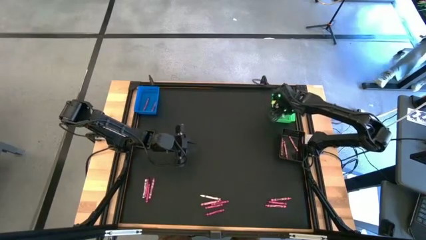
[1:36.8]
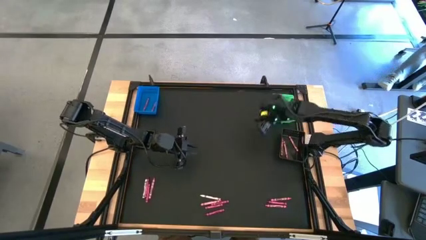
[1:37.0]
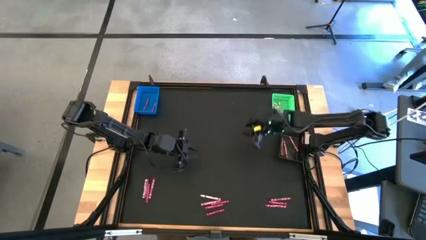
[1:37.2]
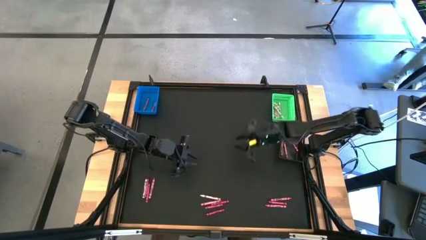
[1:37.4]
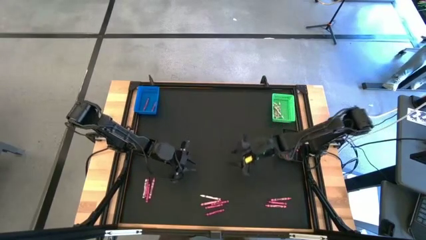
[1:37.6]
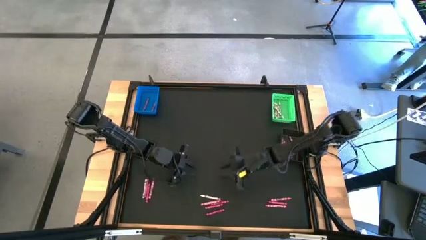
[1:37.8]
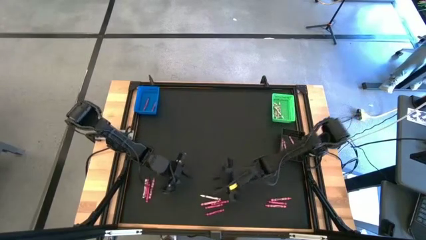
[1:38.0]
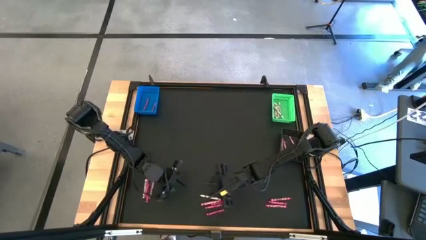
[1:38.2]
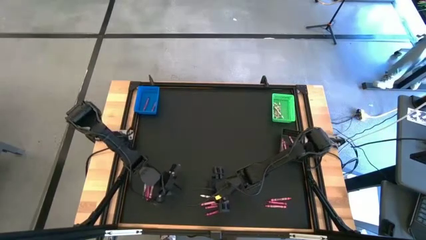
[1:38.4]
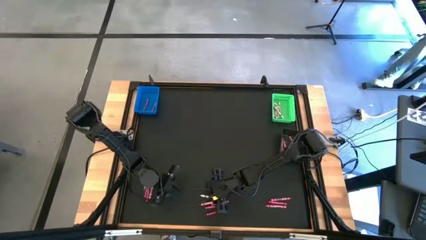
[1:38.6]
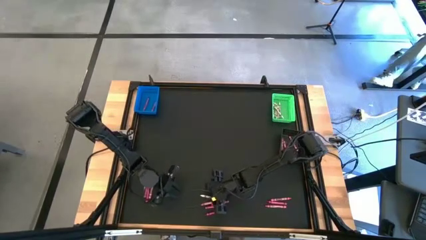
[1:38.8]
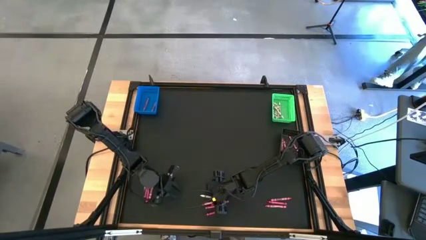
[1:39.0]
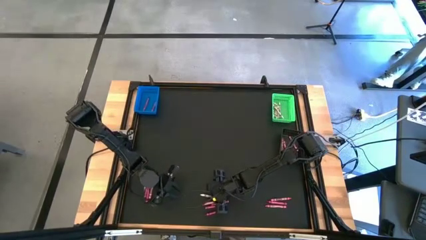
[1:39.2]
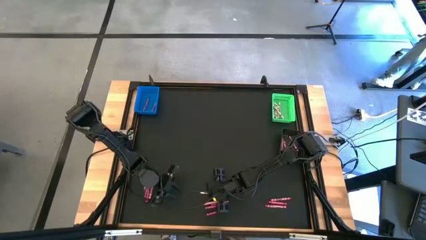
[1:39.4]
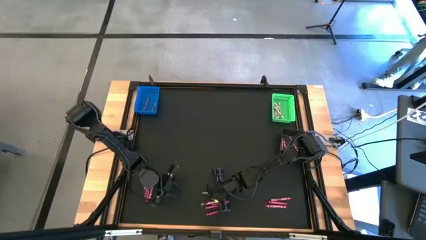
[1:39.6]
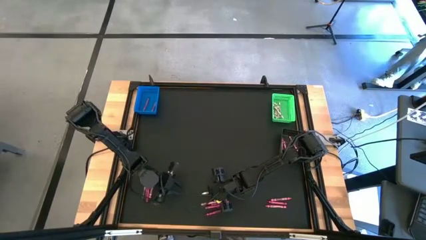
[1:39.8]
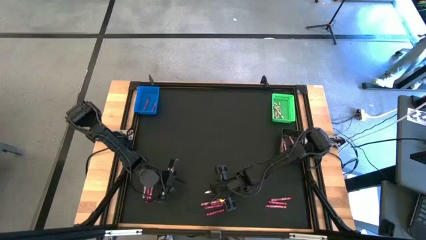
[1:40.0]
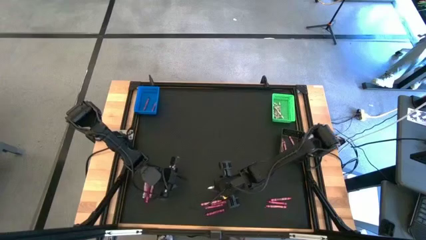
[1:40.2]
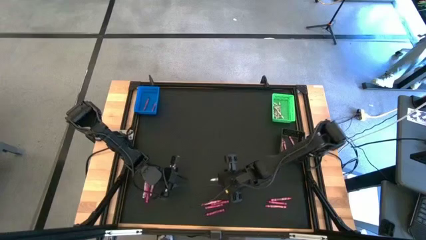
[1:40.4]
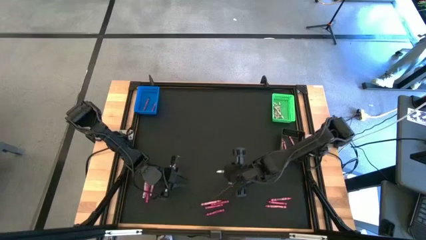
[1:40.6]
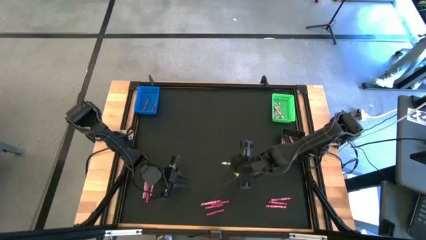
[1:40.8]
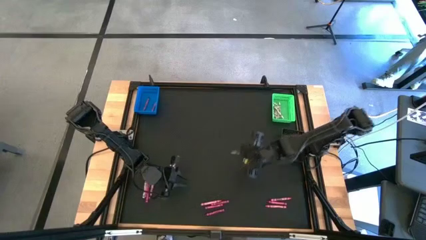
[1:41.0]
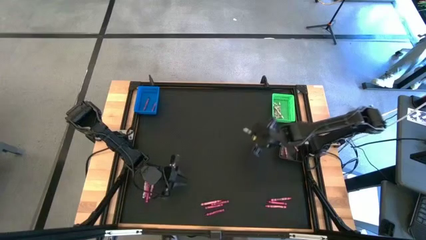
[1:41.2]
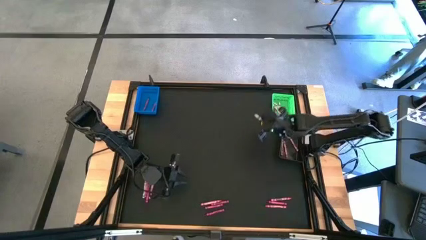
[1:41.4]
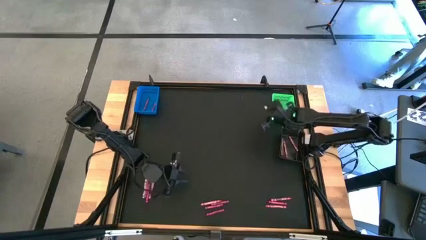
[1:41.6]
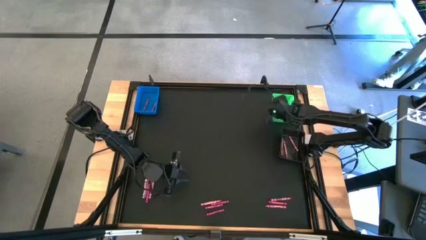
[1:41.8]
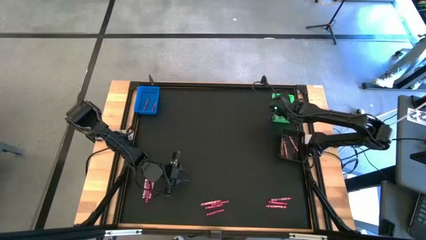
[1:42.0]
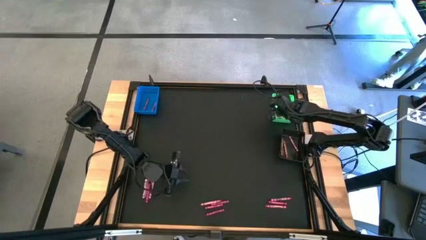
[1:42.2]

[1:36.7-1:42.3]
Task: Sort crayons
Put the white crayon into the green bin

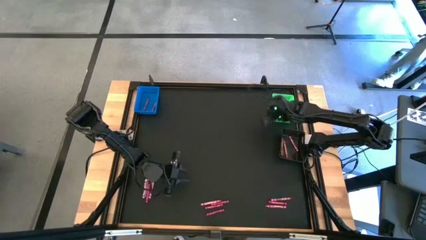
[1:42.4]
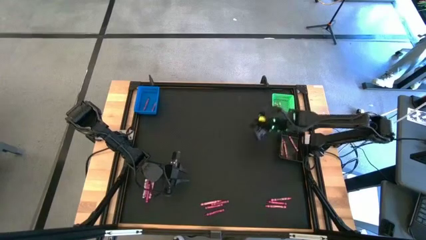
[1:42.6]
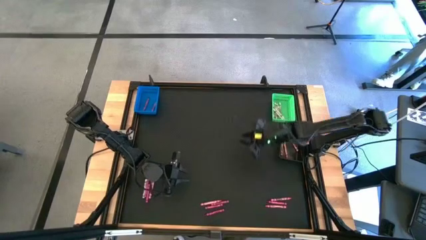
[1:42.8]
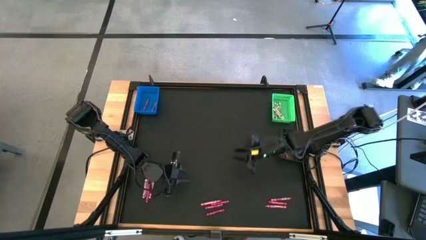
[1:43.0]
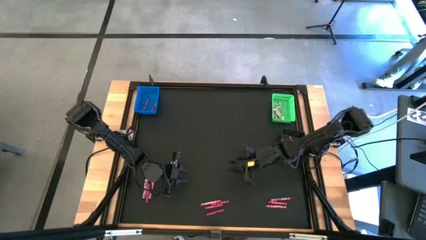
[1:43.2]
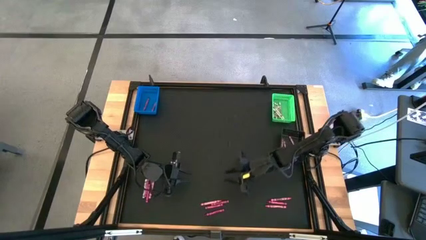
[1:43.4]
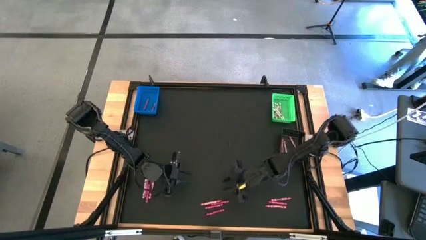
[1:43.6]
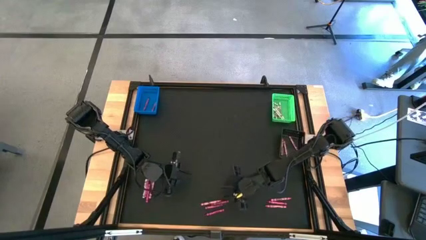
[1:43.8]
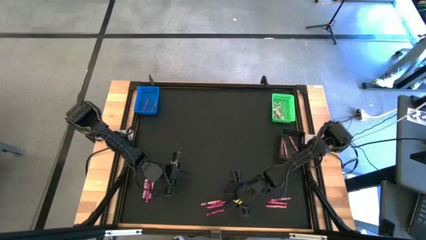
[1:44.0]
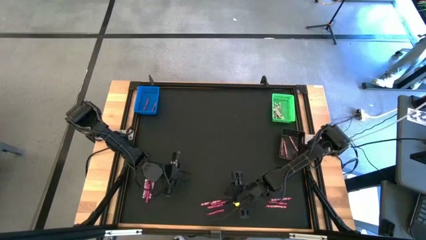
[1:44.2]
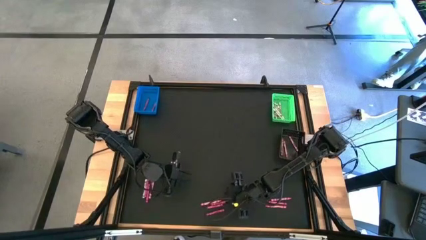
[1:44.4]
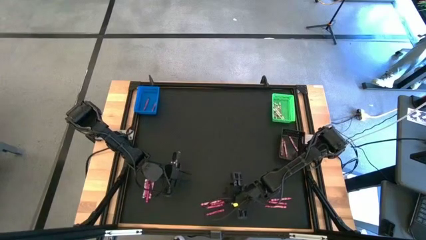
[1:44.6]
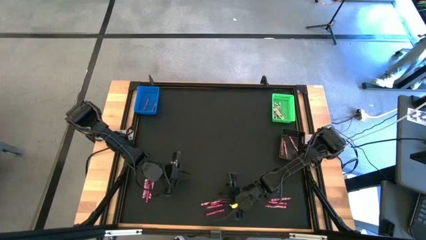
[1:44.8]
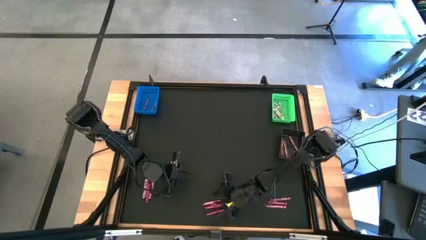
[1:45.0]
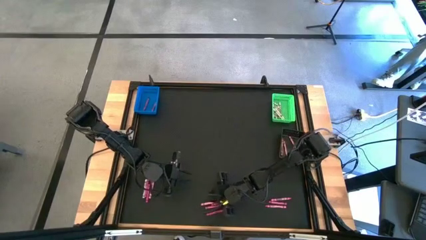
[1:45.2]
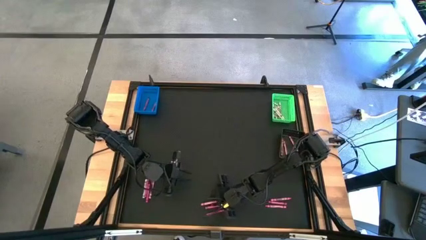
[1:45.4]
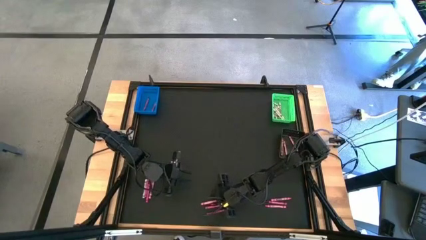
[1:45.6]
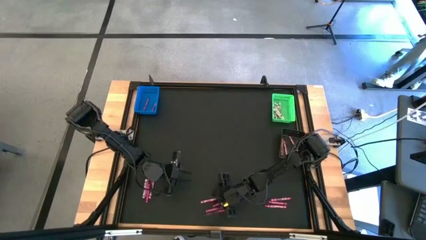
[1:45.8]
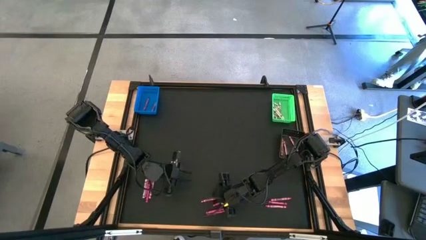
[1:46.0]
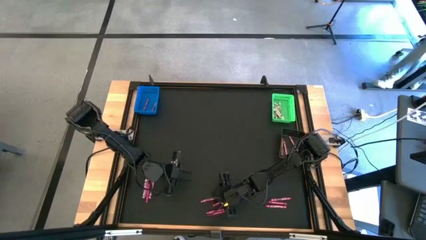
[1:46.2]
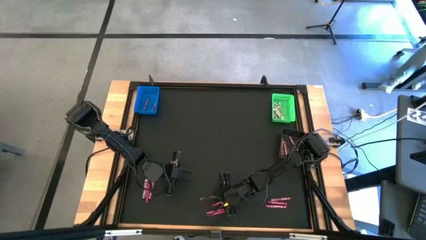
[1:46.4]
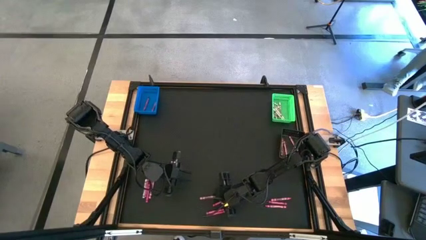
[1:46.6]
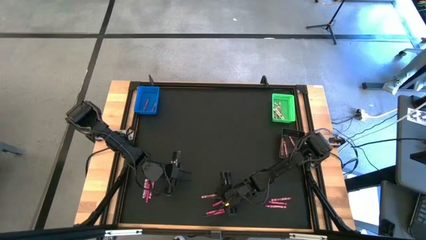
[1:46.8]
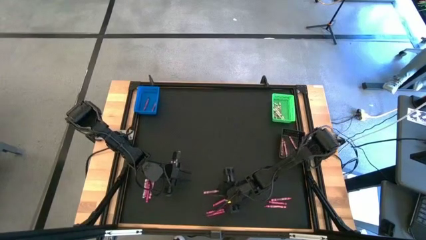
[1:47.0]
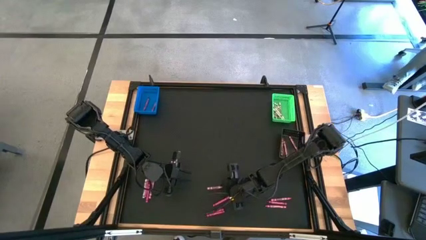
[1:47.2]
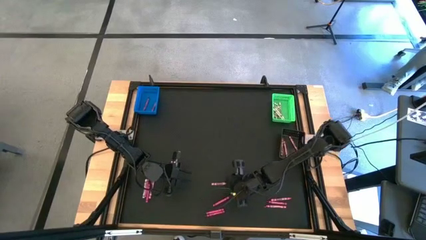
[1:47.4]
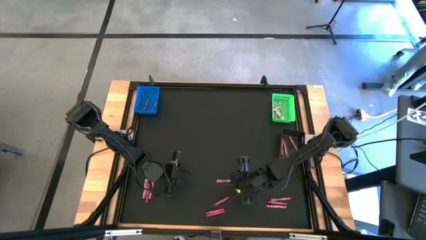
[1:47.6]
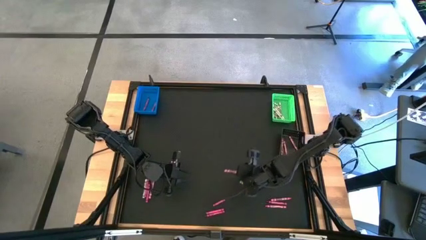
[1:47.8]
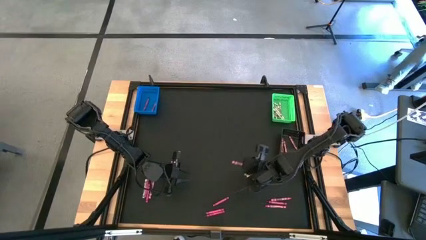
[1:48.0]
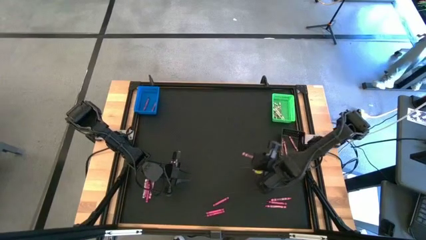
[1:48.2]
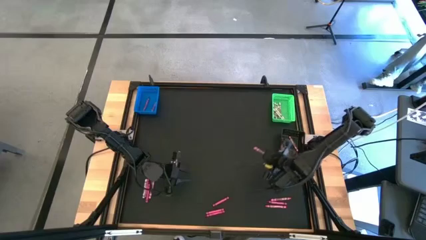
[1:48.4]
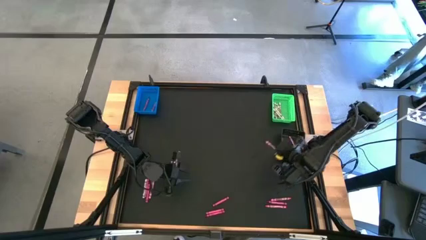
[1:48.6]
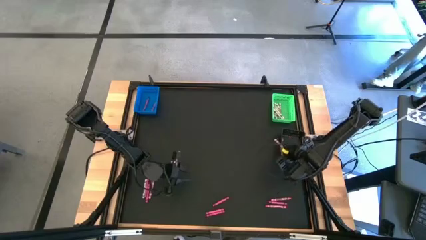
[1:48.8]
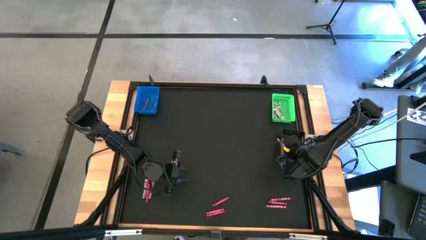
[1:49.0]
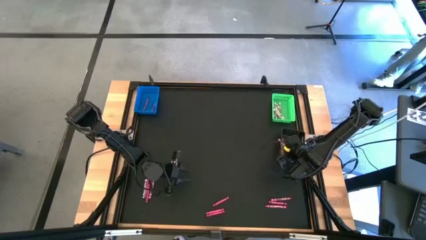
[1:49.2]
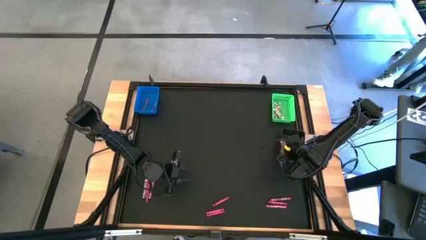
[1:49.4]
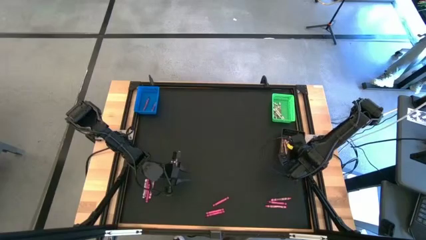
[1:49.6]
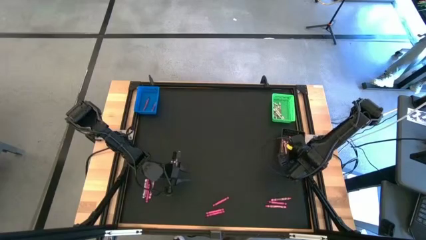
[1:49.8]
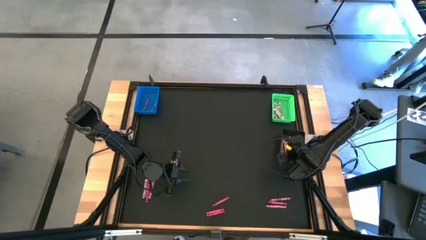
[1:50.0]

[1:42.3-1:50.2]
Put the pink crayon into the black bin

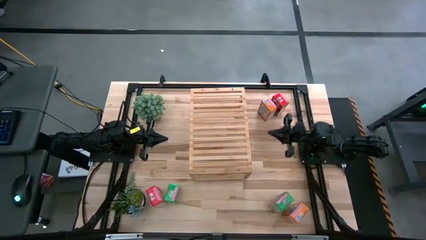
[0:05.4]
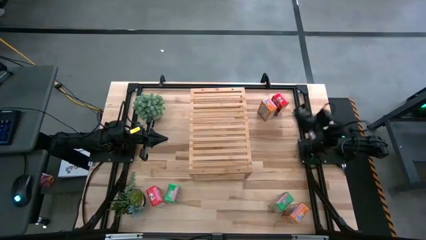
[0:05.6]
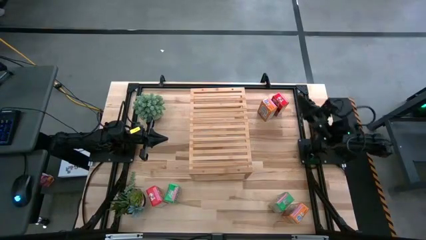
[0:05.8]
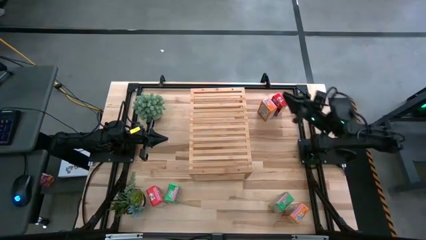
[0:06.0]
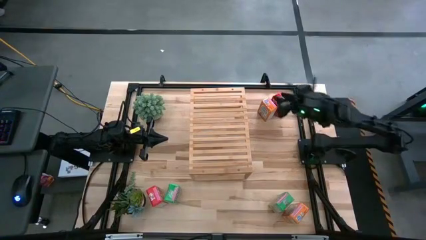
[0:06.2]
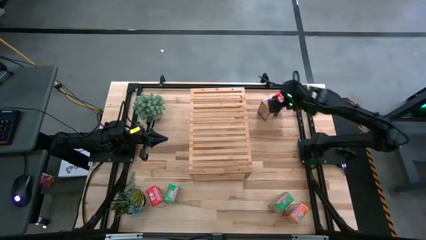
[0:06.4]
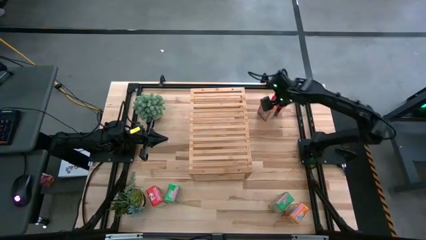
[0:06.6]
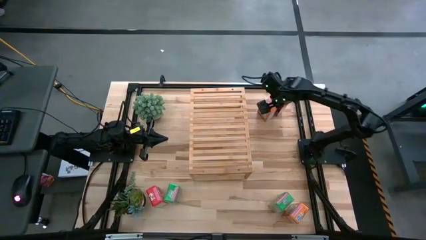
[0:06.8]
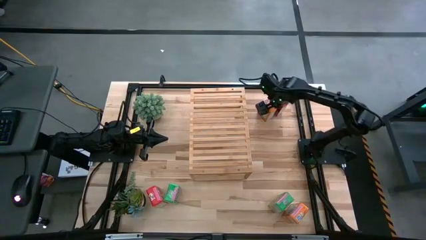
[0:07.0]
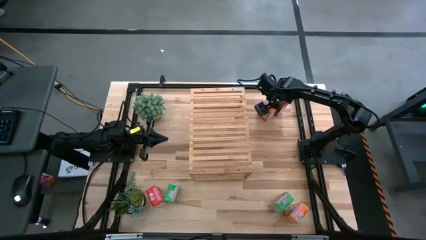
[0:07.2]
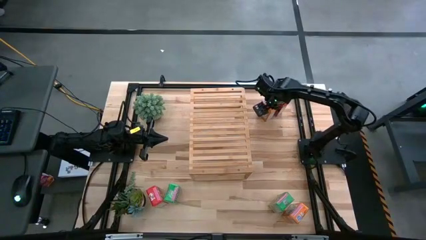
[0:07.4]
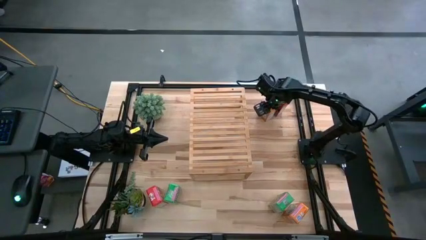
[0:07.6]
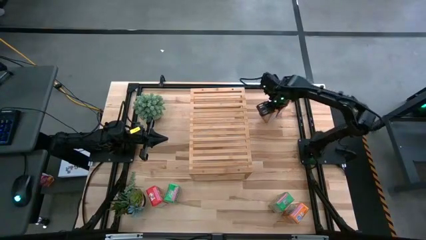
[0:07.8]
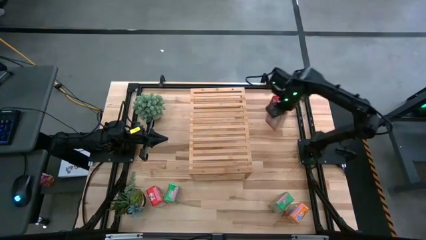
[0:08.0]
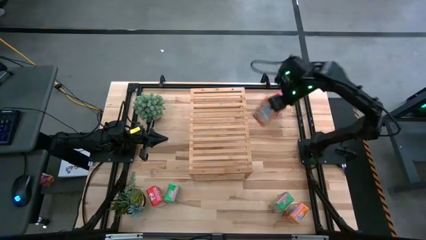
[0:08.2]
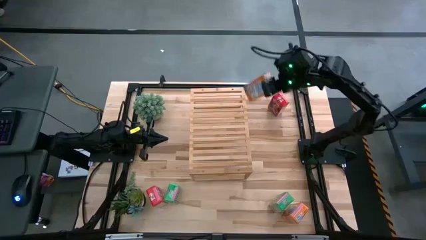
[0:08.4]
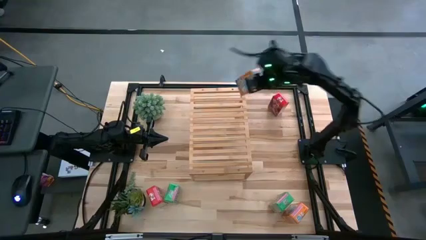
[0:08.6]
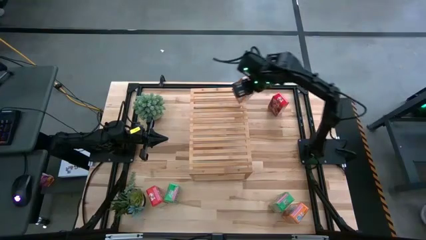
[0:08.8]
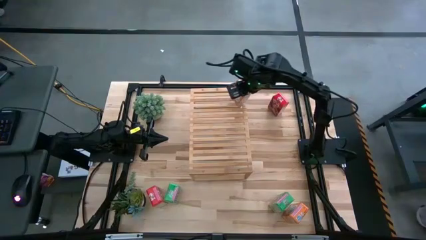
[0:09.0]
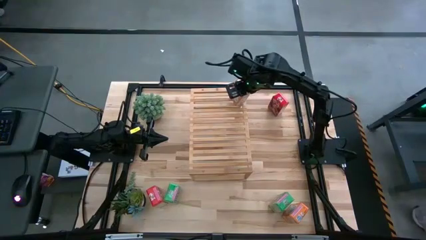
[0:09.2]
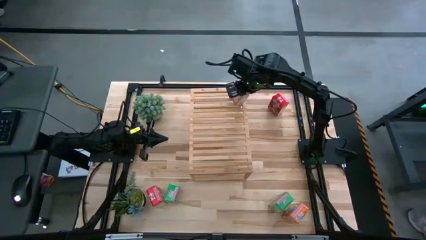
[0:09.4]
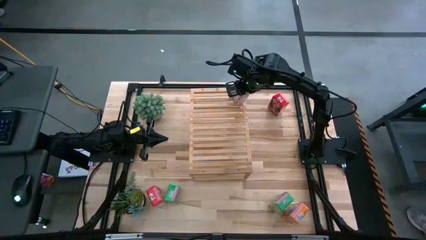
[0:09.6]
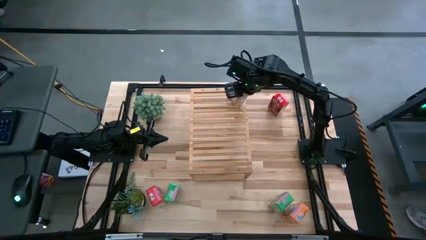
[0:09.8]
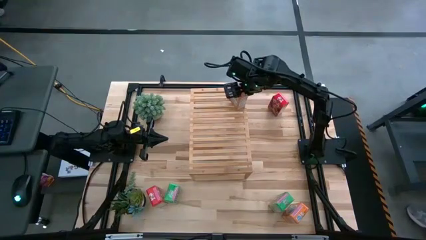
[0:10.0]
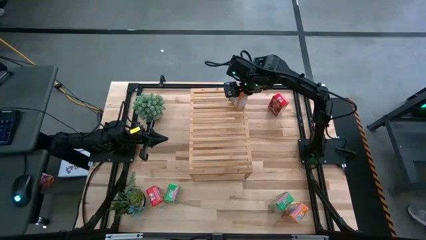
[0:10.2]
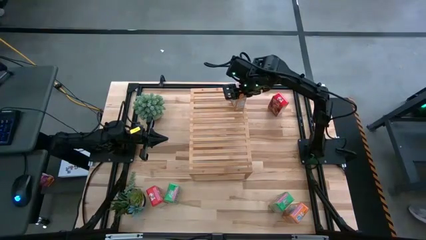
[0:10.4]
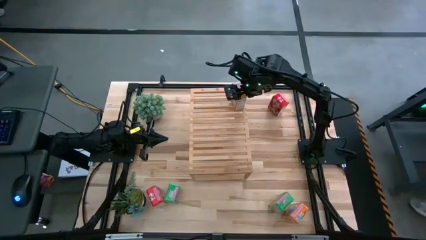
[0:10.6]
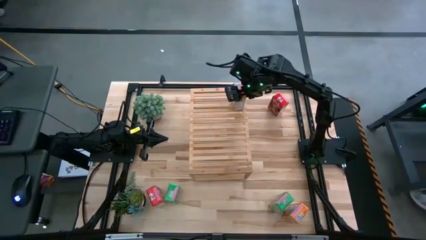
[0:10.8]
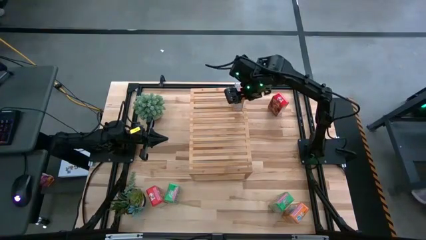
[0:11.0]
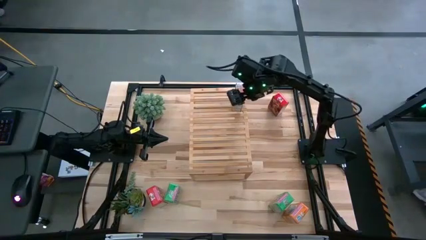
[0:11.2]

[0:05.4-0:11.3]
Task: Stack cereal on shelf
Put the top orange cereal box on the shelf
